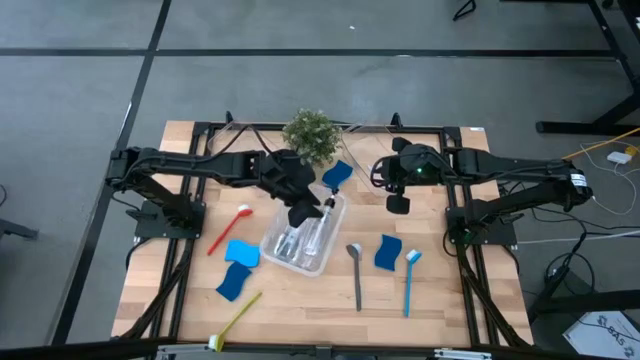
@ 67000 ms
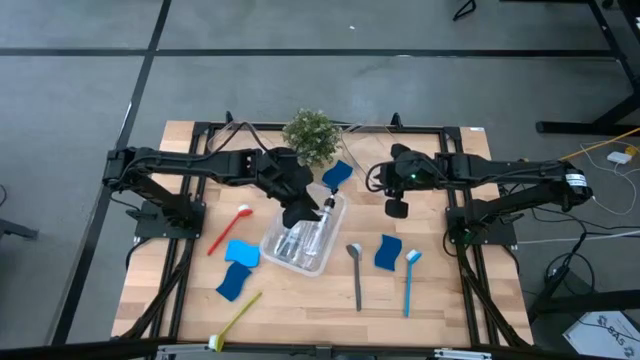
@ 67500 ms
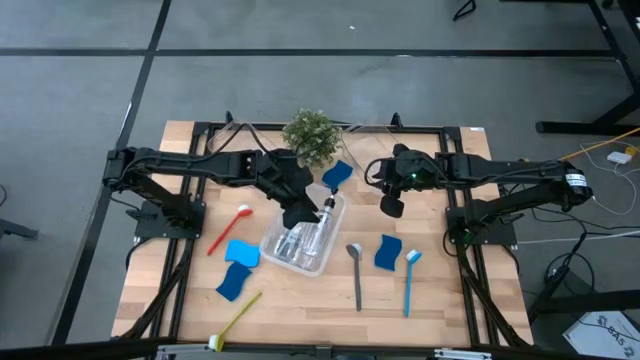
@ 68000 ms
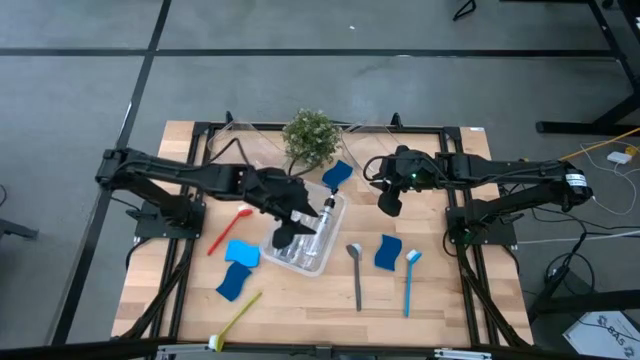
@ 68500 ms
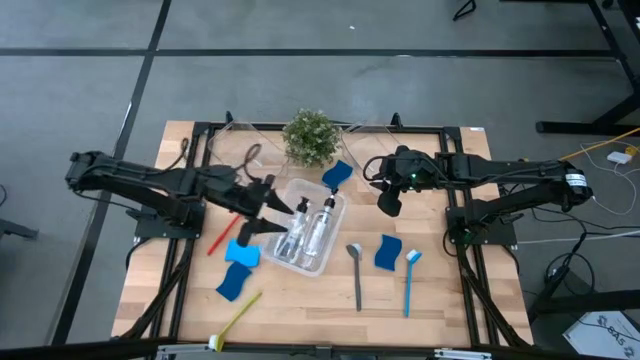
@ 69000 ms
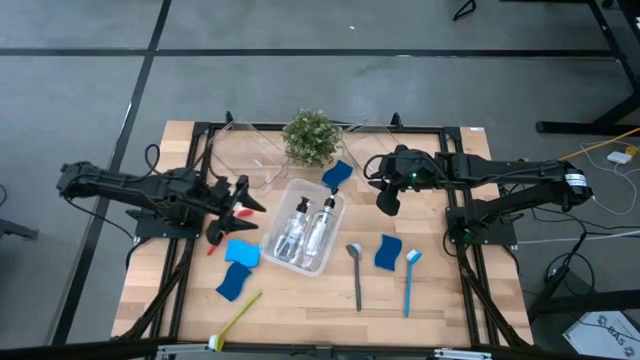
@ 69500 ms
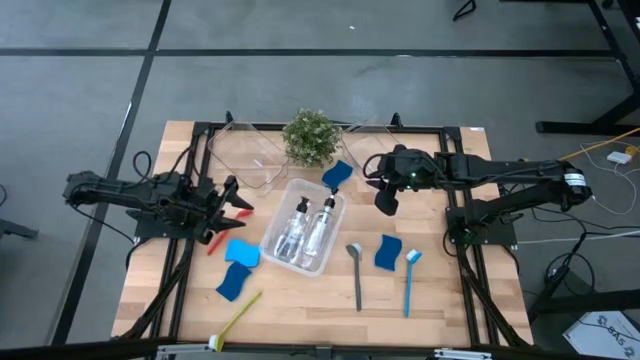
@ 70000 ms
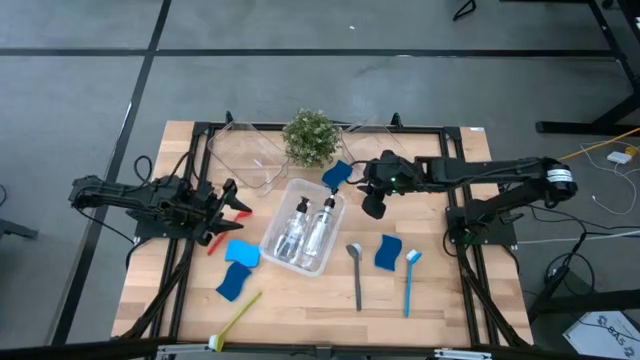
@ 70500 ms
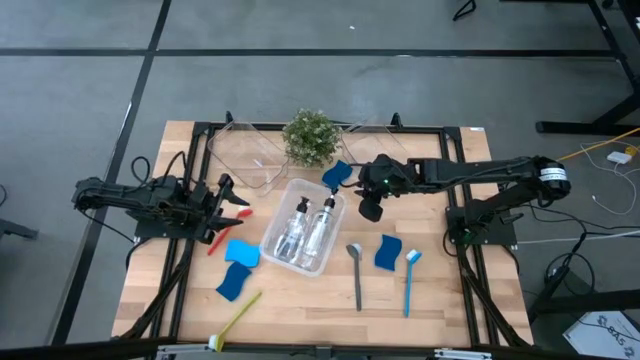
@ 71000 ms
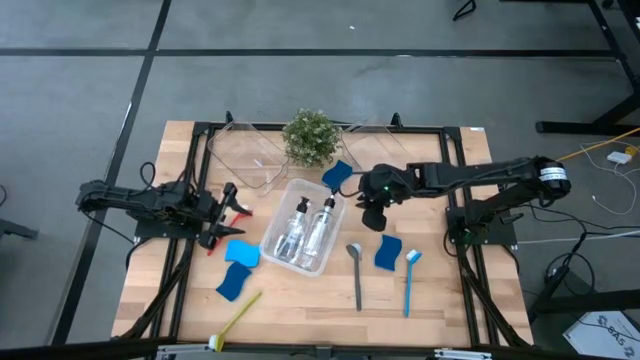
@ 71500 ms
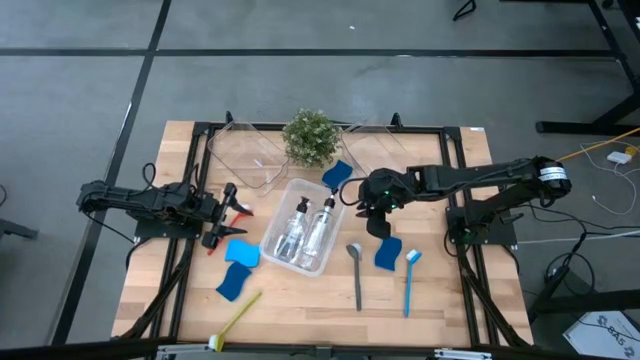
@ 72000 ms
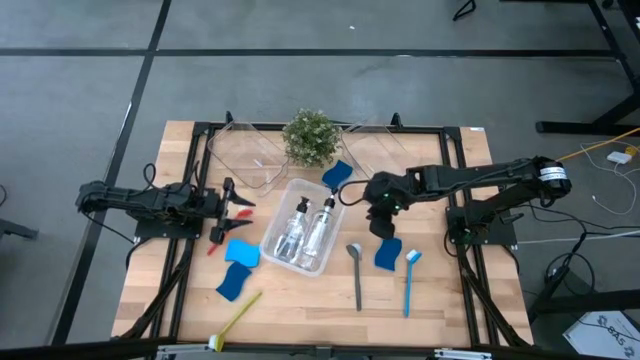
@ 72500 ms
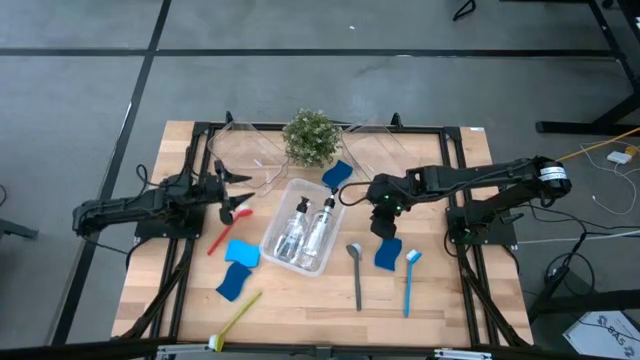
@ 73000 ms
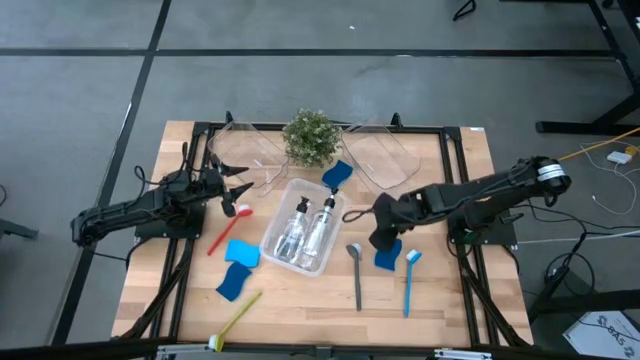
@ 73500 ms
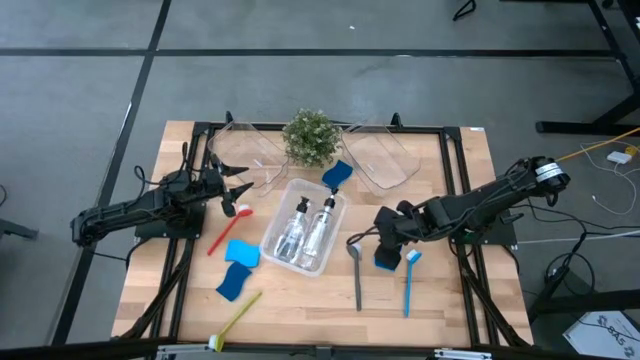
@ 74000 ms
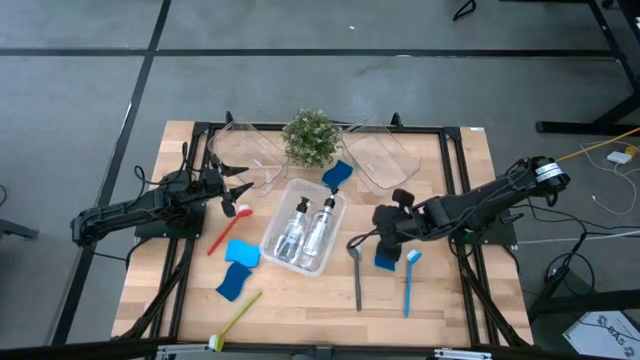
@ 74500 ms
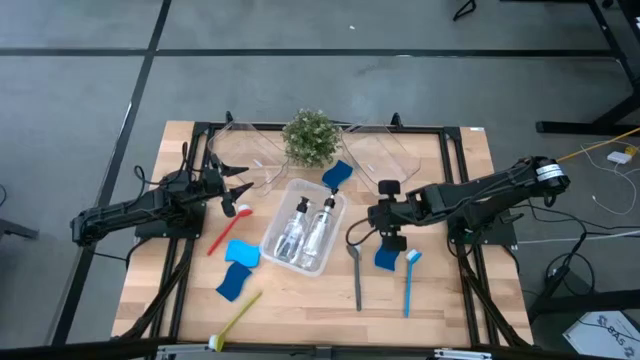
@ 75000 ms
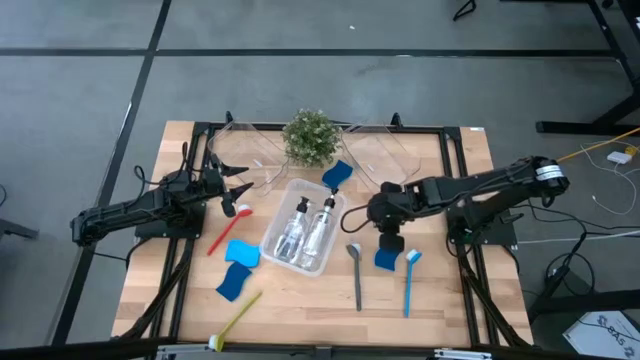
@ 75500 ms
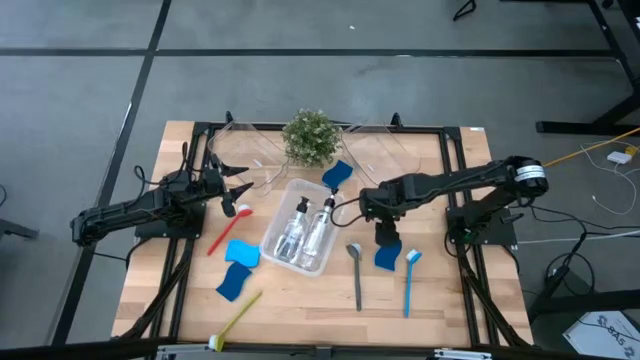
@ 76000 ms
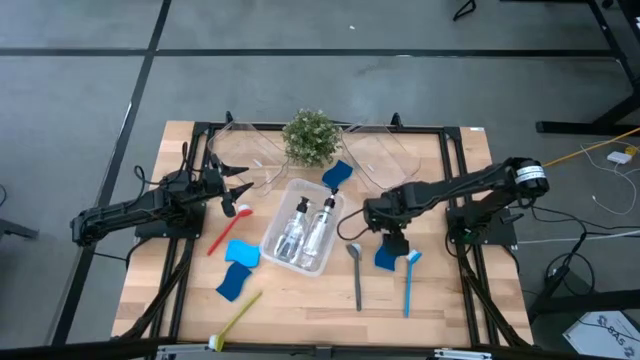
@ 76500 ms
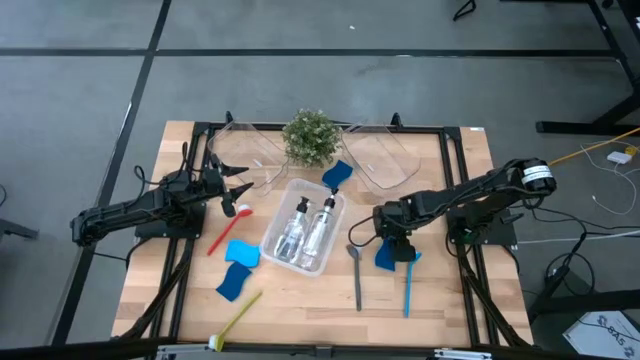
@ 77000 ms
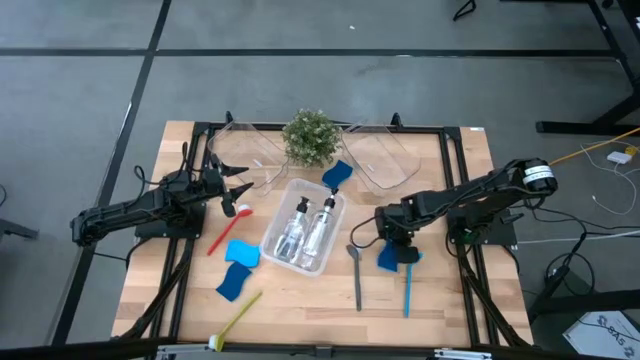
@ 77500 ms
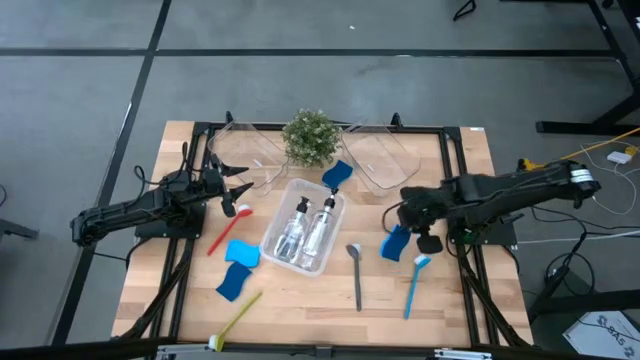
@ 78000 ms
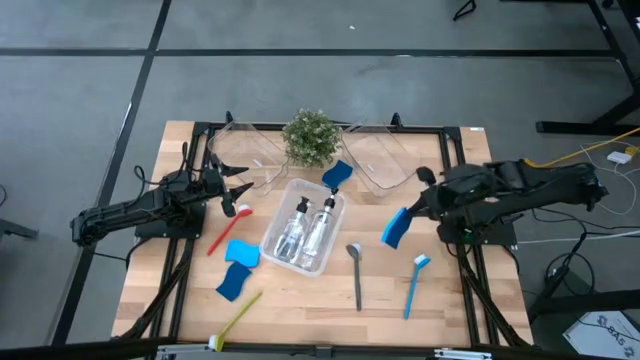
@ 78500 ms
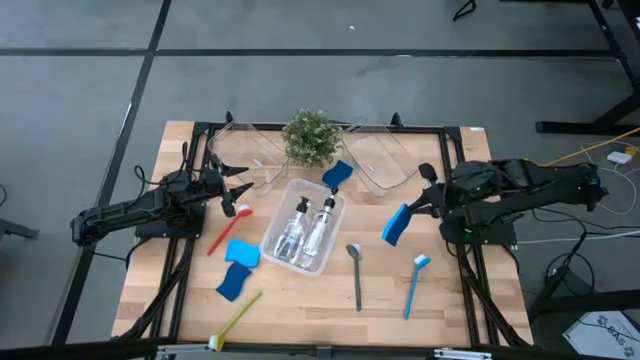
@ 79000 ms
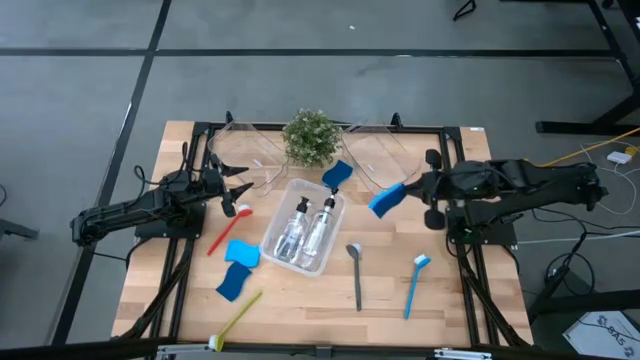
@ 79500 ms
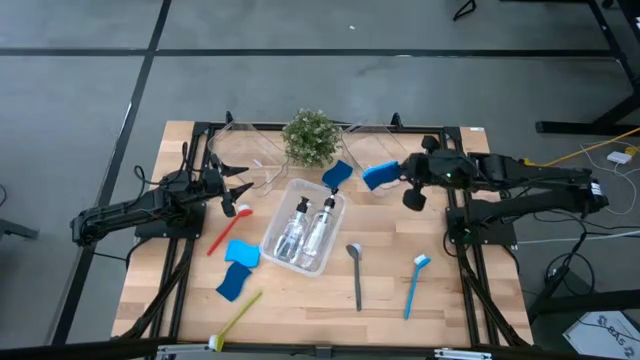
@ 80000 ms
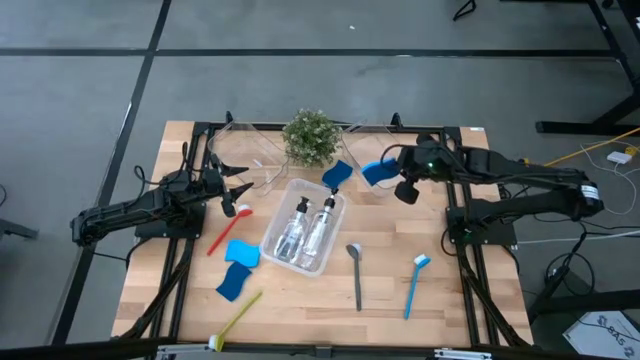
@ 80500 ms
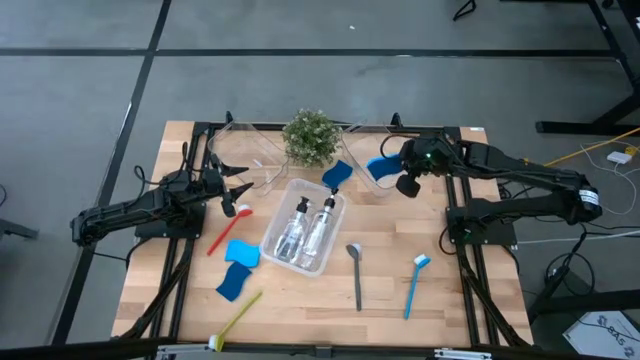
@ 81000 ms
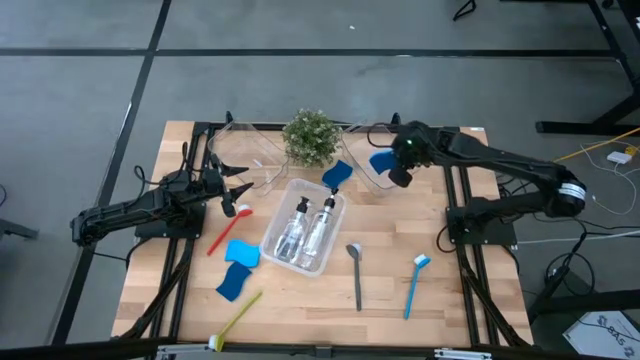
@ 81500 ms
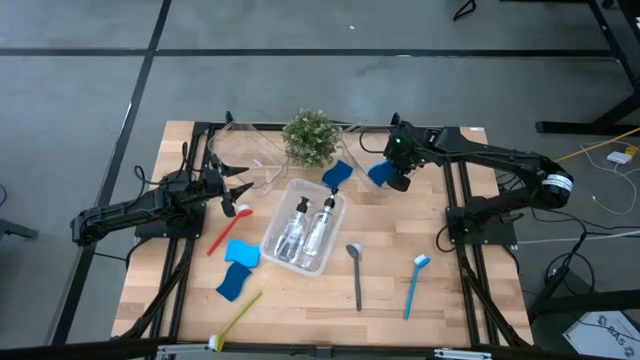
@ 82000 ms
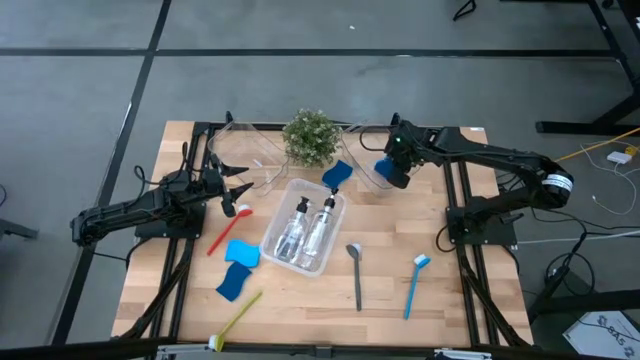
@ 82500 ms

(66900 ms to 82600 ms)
Task: Pick & Place Kitchen Sink Supplies
Put the blue sponge into the right transparent bin

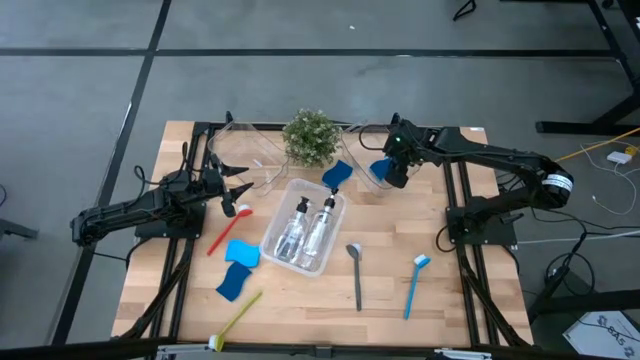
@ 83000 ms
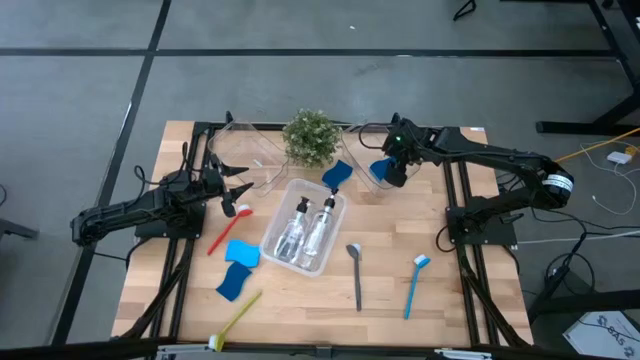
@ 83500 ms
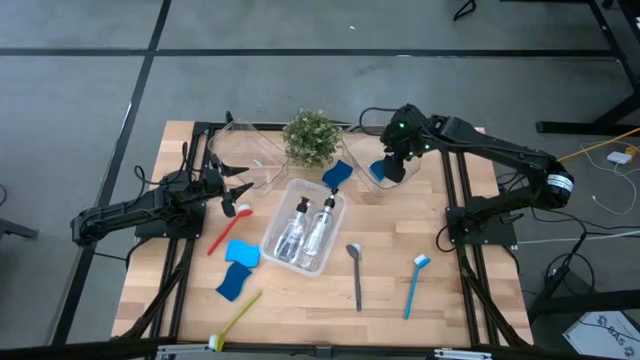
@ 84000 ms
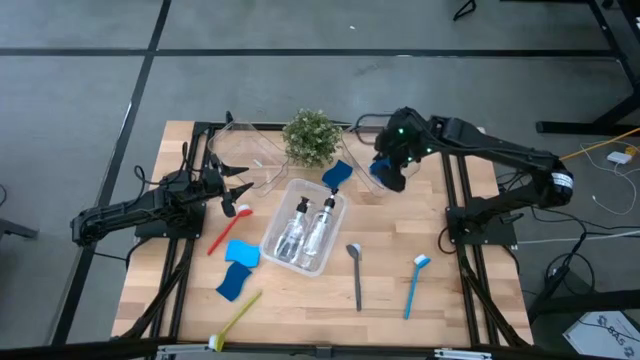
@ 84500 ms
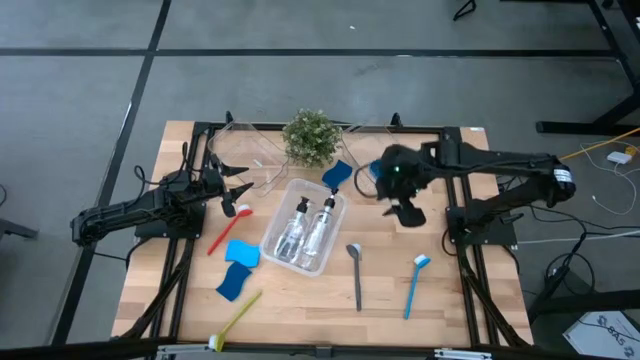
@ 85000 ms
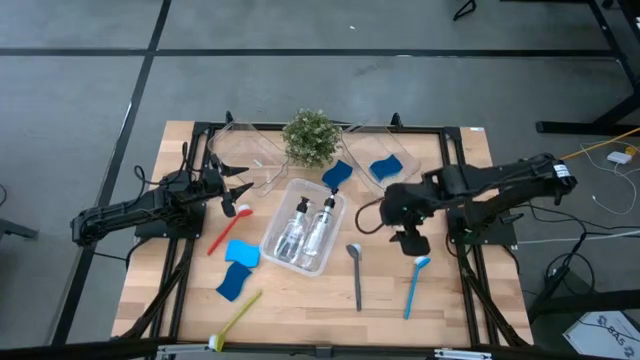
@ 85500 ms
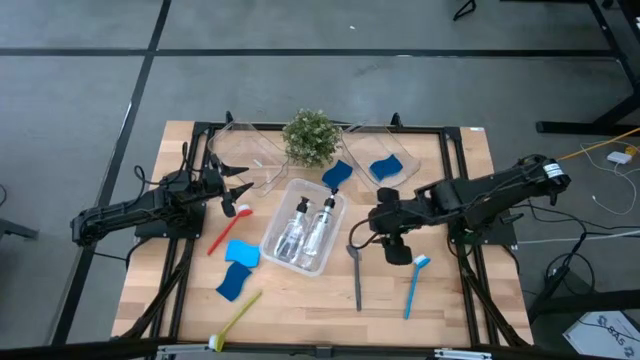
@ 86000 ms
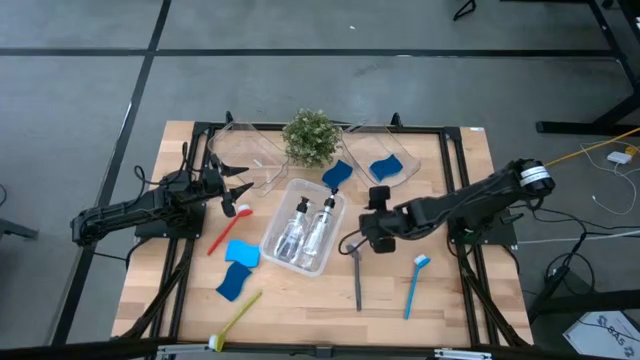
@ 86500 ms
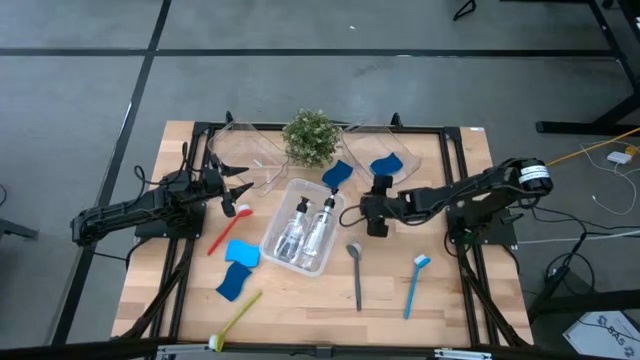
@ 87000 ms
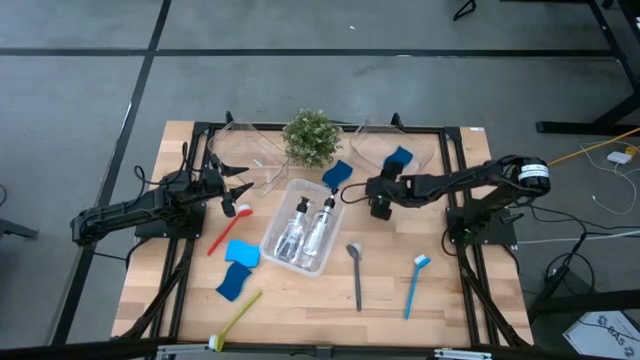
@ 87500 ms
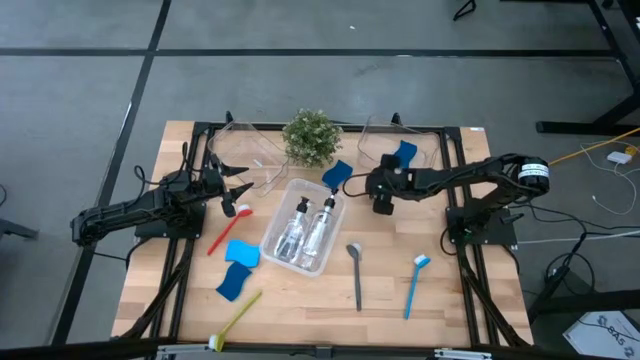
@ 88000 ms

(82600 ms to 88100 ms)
Adjust the right transparent bin
